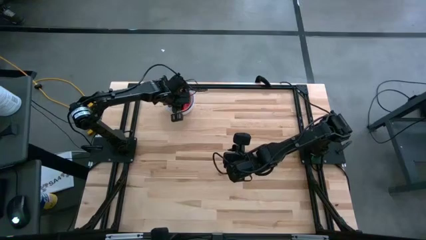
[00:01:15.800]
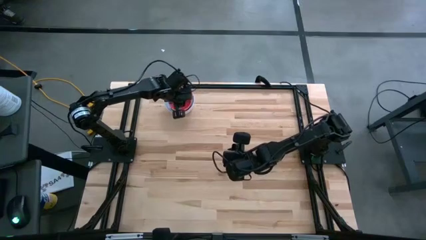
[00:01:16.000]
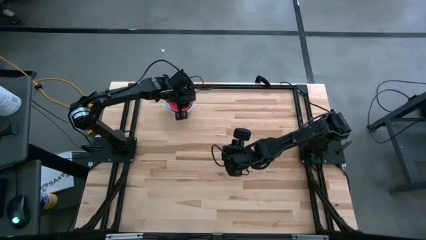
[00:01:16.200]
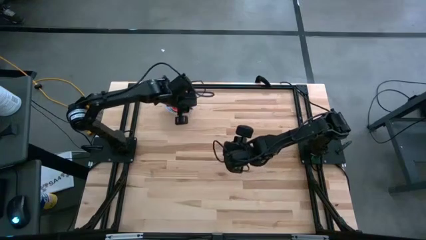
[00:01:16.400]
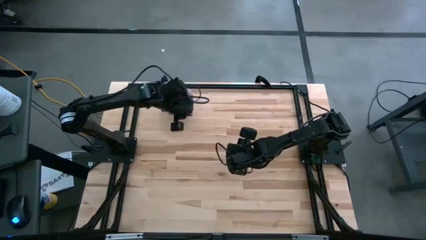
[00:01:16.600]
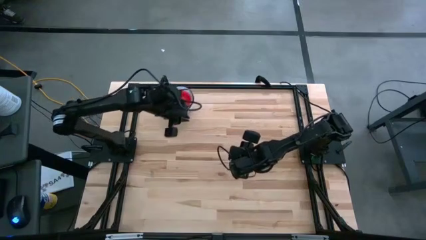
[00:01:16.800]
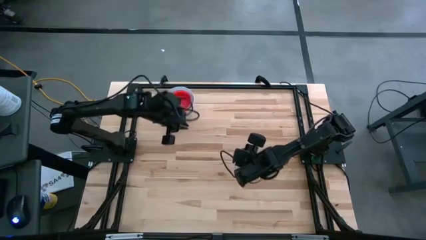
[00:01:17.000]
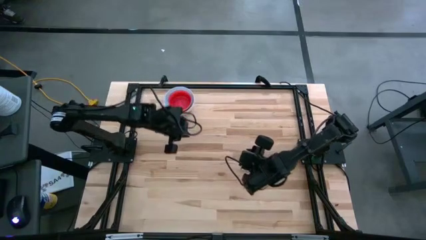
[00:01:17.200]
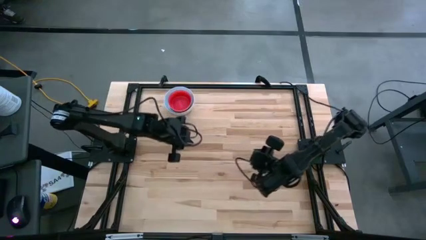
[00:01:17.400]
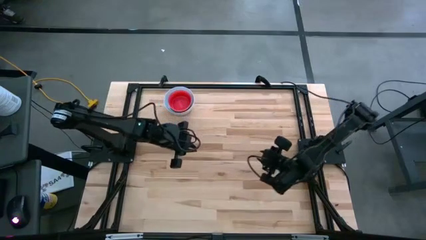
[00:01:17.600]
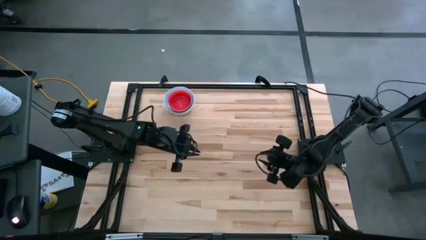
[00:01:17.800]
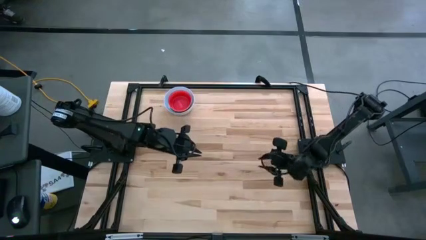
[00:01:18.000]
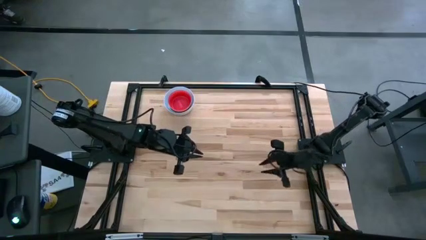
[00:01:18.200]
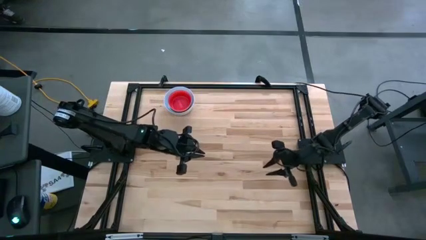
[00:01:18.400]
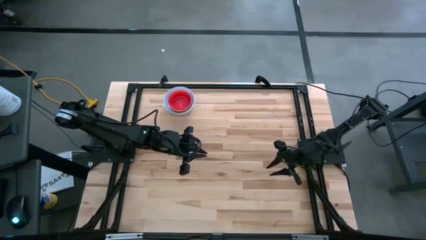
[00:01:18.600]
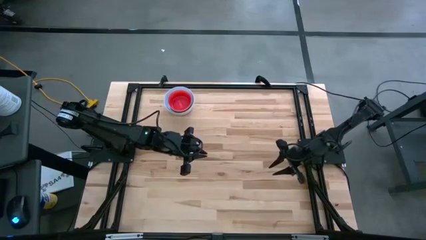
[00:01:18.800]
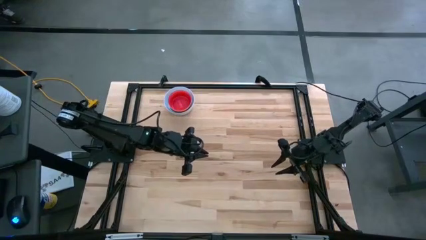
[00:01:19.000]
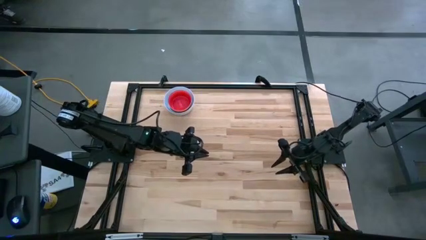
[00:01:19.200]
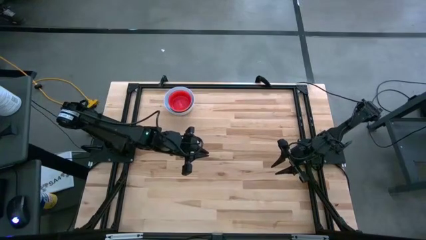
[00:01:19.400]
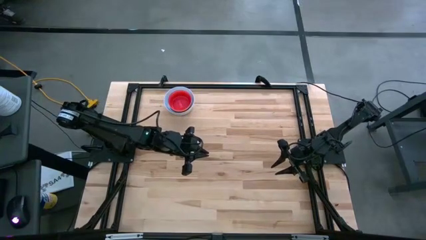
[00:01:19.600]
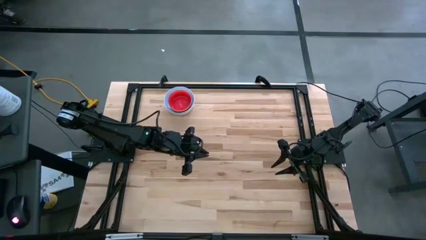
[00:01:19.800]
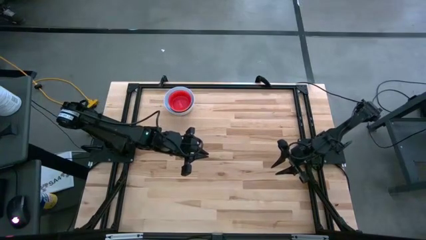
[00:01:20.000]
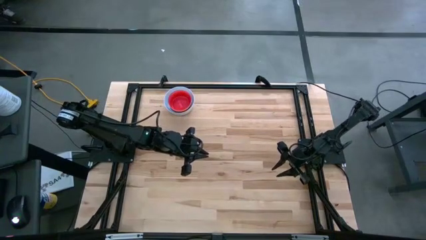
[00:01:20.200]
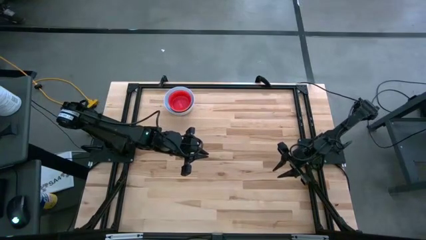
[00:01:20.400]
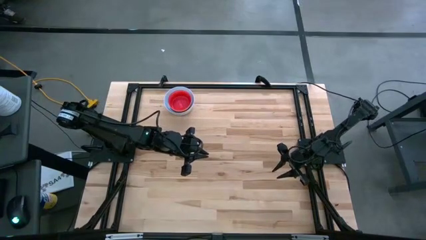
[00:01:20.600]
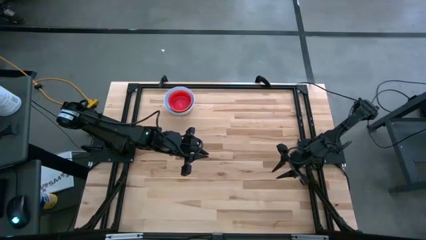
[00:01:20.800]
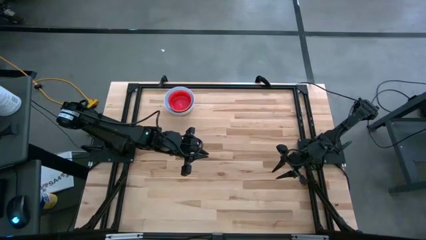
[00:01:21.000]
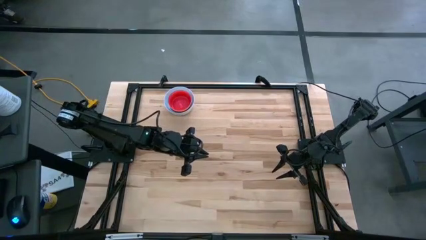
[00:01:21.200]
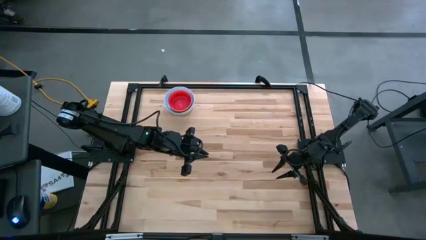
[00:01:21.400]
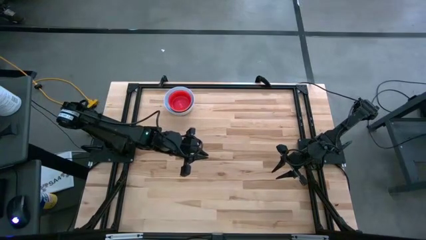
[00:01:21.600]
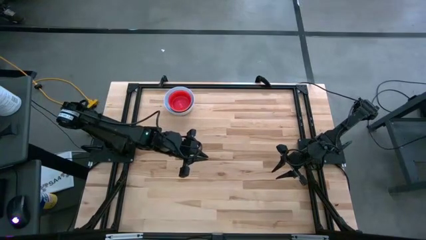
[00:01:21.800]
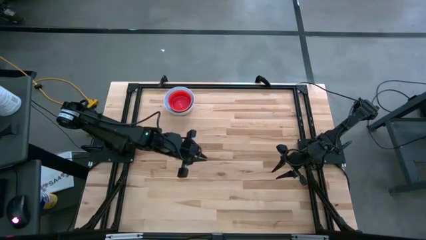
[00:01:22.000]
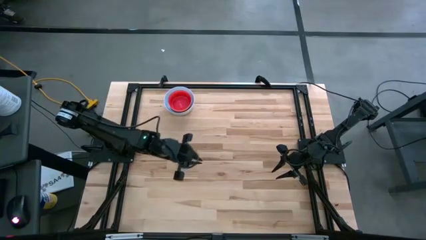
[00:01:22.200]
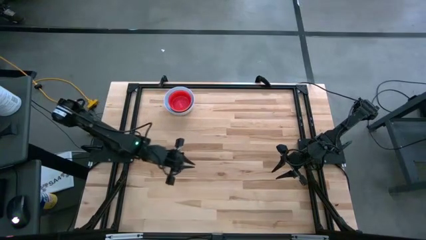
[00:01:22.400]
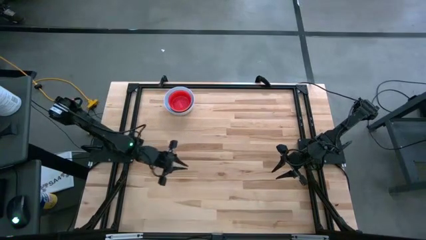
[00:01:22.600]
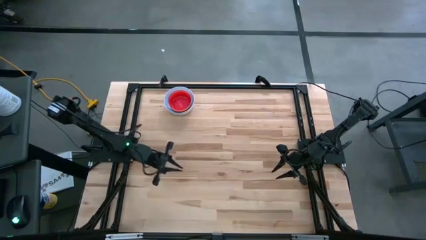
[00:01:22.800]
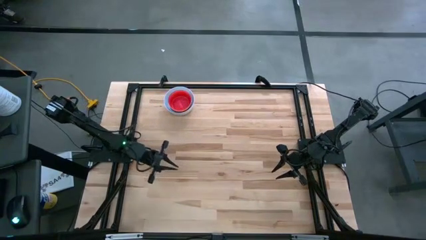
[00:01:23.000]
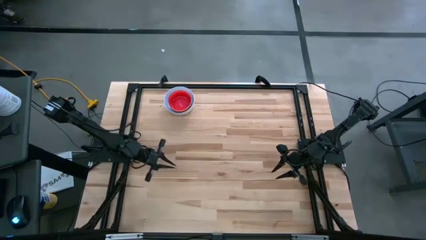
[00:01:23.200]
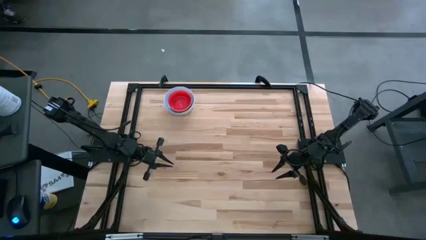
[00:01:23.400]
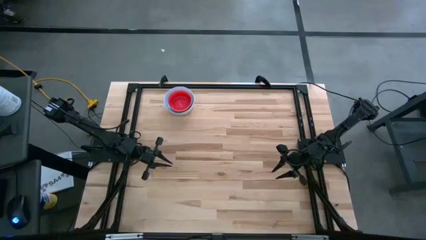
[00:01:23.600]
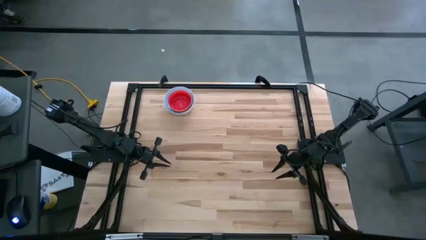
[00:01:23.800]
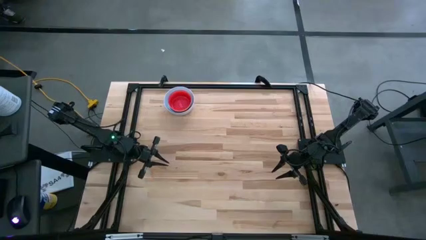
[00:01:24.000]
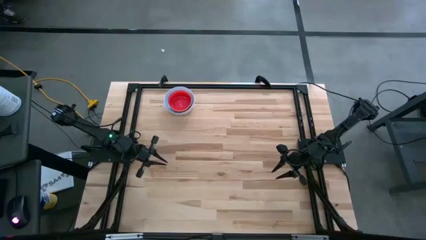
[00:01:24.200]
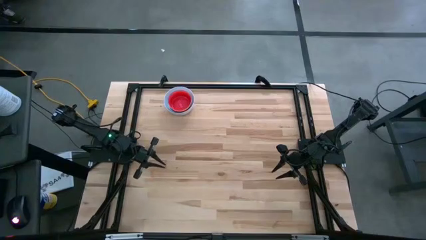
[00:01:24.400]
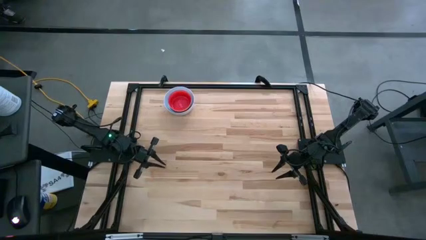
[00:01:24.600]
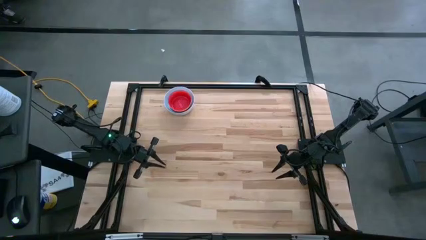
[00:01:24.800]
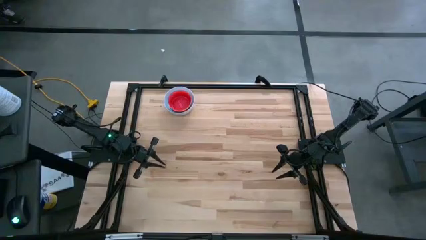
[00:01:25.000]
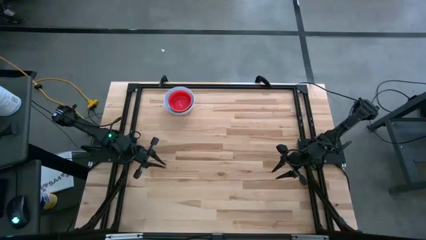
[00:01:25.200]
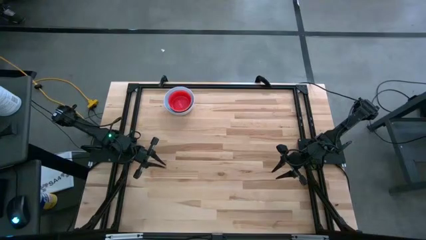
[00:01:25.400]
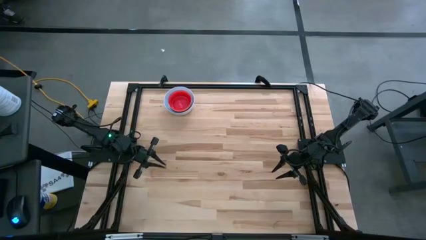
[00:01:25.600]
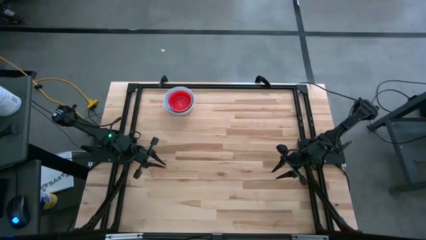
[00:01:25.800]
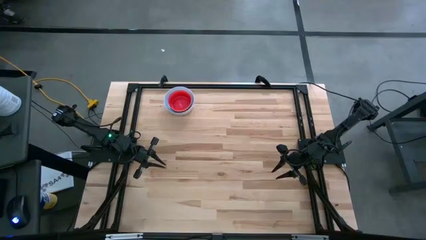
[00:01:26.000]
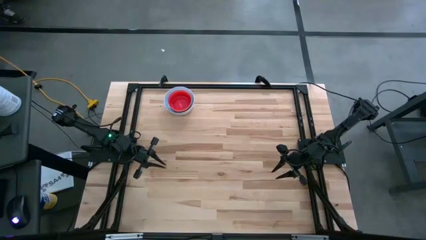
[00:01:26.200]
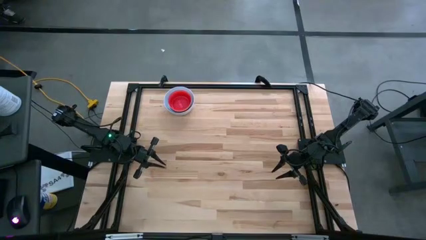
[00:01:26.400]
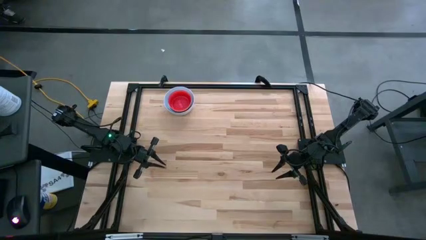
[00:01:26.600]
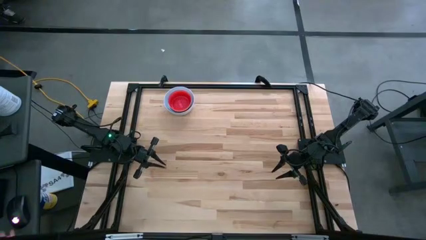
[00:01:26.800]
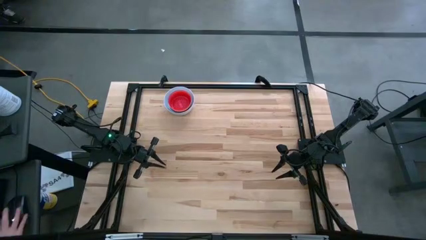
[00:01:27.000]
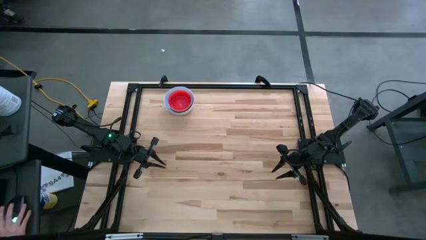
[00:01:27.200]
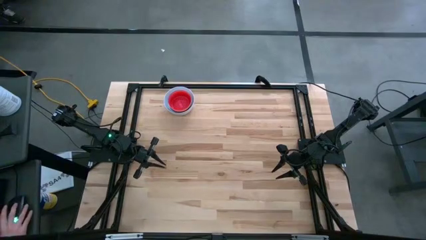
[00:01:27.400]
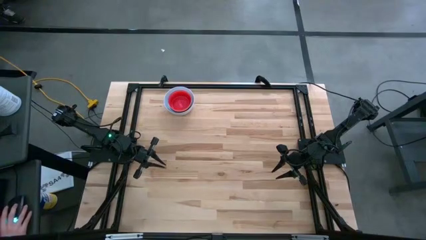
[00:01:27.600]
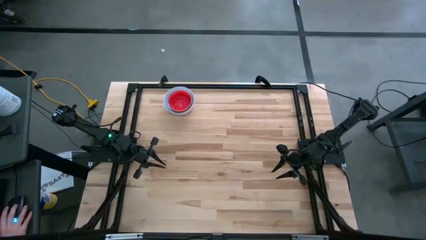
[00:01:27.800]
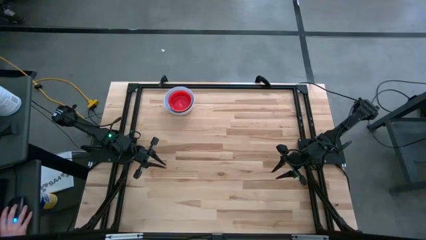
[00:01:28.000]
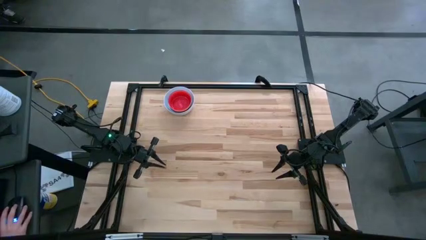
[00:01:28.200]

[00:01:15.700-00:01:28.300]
Return to Home Position

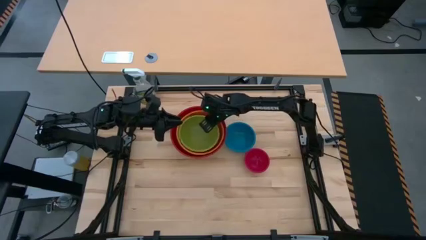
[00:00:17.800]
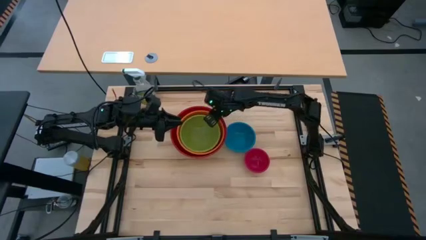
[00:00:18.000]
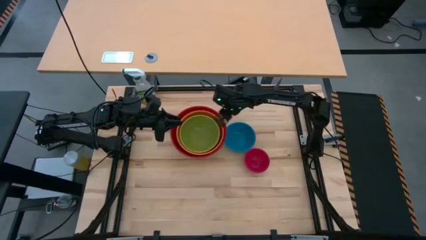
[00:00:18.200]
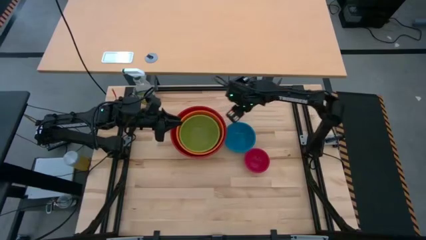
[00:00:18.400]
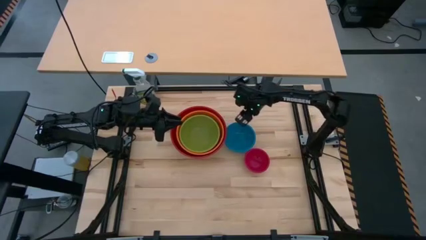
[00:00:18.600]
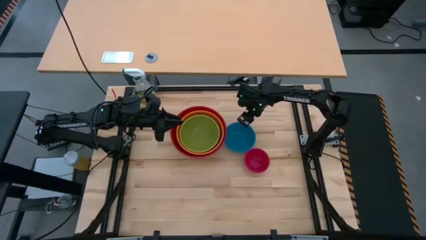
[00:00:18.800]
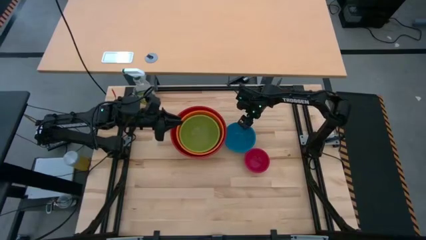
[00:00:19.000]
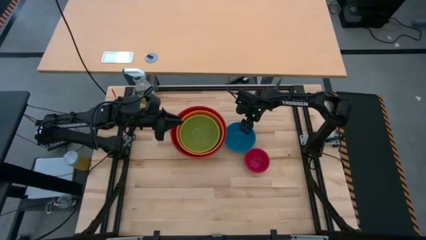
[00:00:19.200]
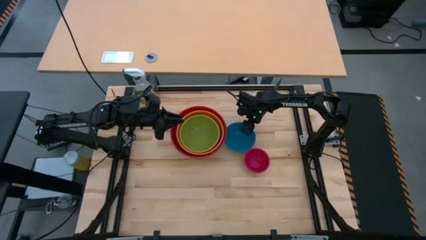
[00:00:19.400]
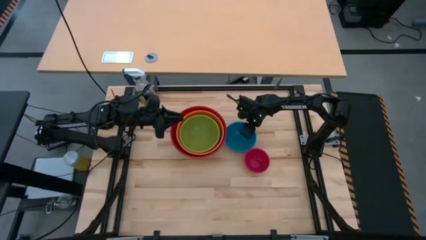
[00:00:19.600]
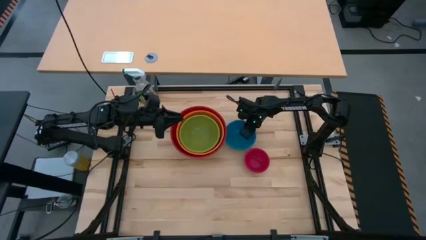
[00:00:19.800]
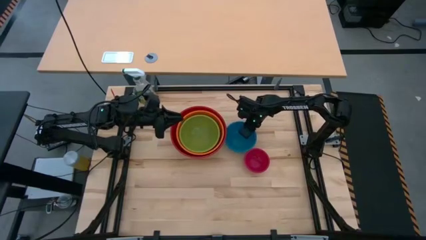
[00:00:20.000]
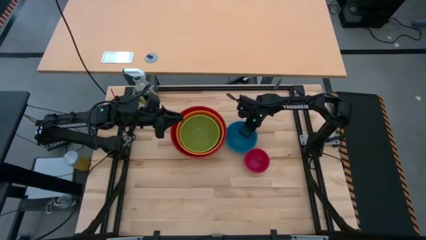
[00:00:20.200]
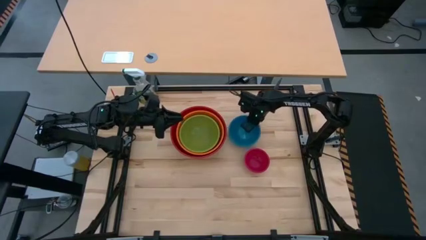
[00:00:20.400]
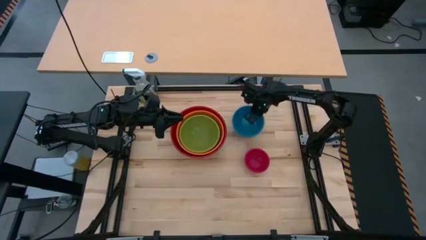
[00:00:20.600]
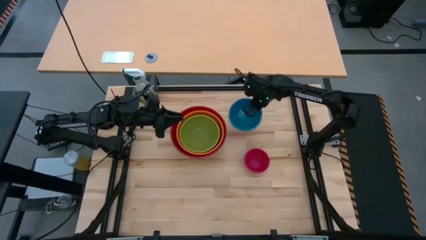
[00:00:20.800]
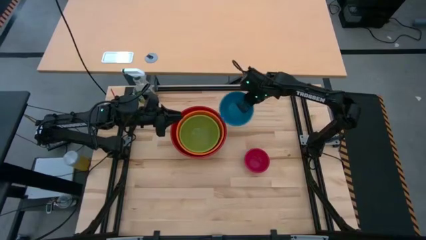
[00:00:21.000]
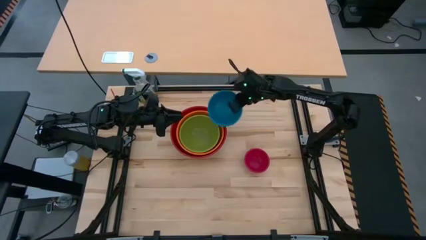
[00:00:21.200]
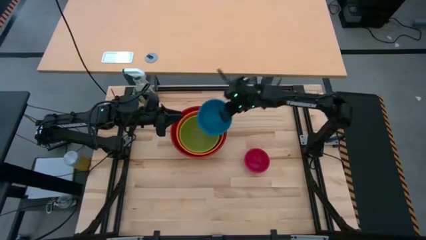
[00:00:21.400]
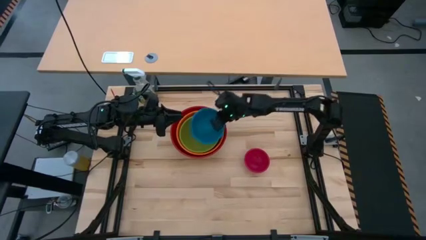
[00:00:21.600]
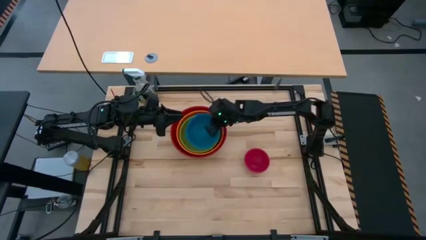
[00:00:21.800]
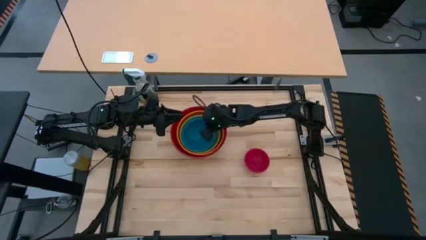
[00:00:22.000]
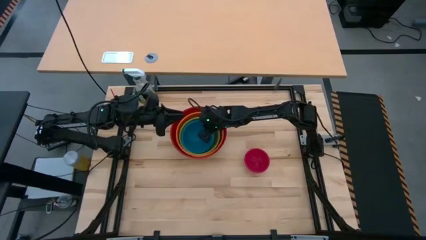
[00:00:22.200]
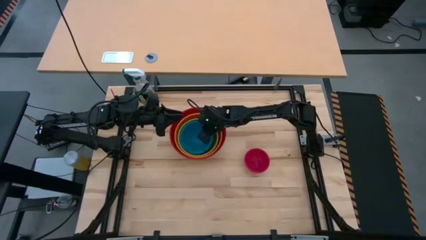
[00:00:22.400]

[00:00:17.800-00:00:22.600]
Stack the blue bowl on the green bowl
